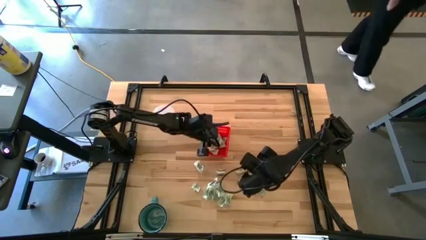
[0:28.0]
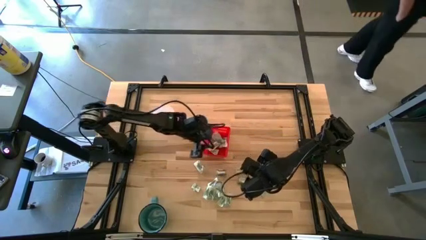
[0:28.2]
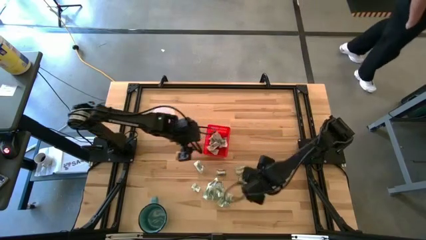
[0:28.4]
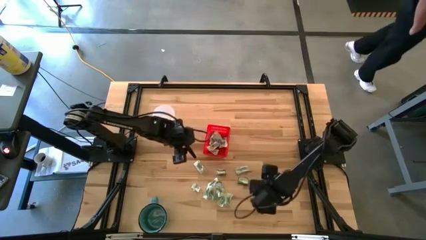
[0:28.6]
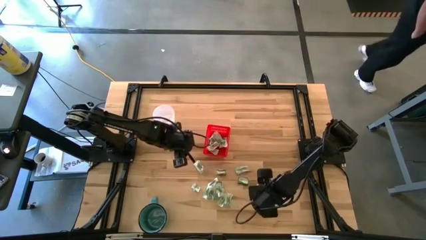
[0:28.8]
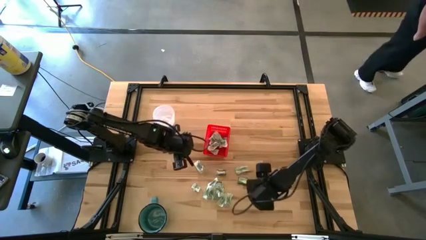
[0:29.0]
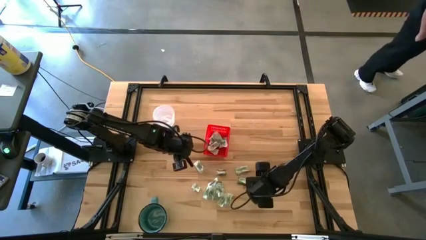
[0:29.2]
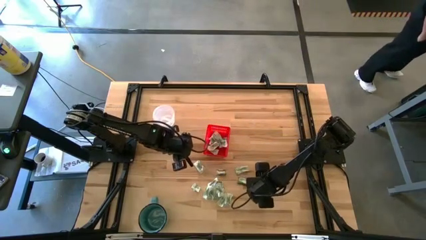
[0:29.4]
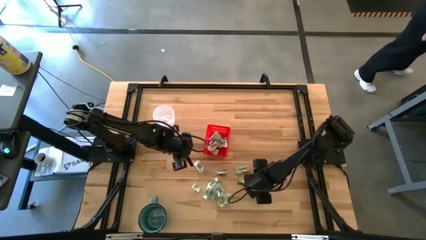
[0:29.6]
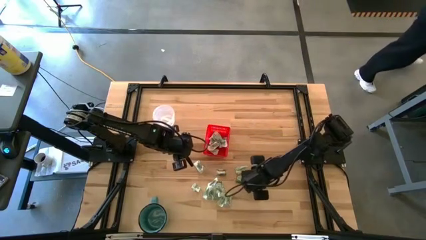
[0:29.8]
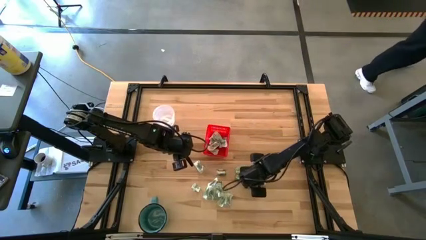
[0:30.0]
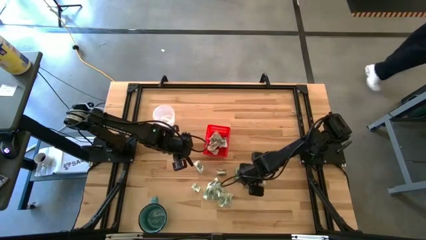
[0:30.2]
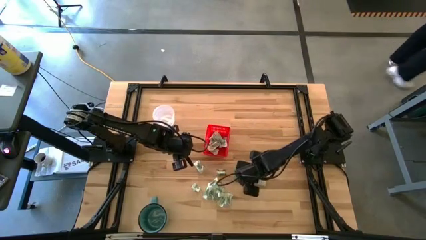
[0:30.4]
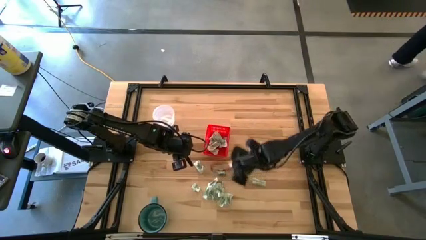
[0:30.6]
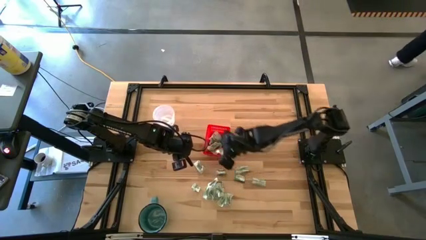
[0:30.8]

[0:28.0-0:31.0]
Task: Pick and place Stevia / Truvia into bins
Put the stevia packet into the red basket

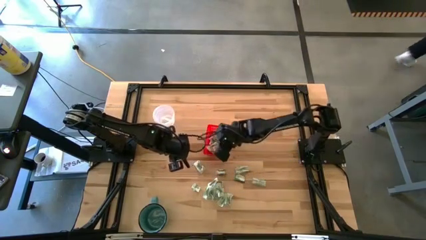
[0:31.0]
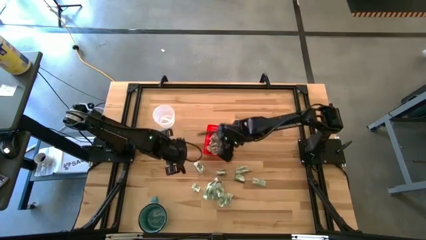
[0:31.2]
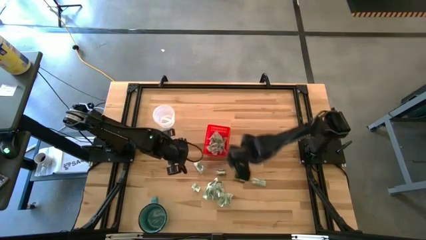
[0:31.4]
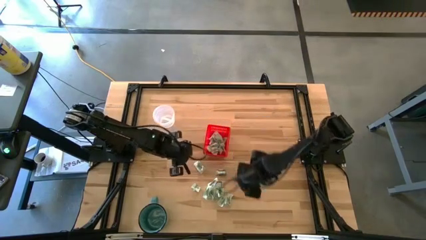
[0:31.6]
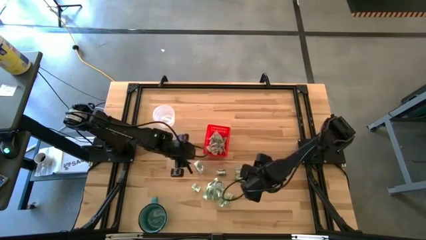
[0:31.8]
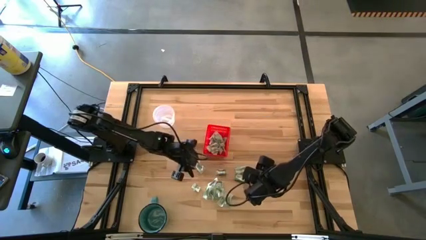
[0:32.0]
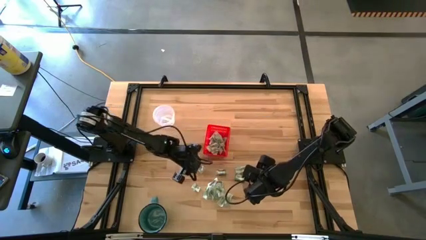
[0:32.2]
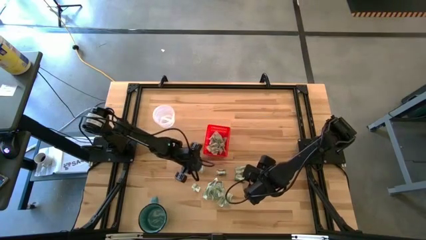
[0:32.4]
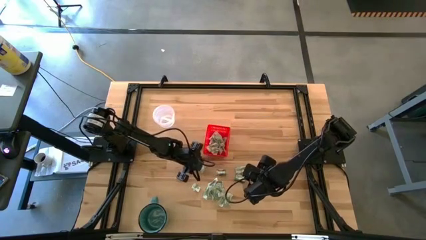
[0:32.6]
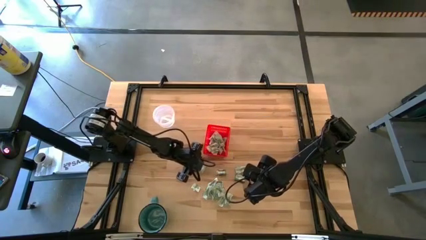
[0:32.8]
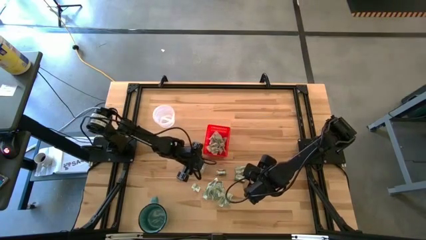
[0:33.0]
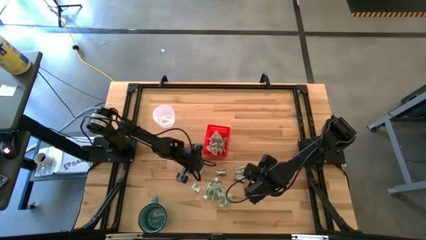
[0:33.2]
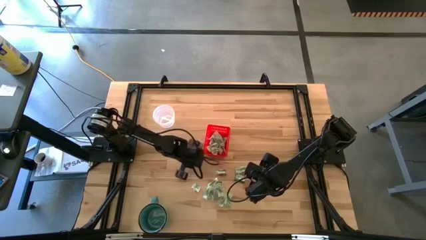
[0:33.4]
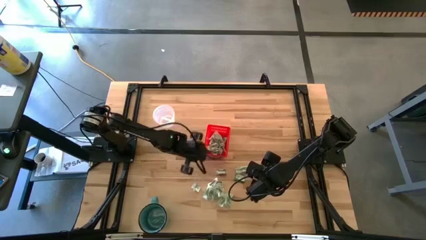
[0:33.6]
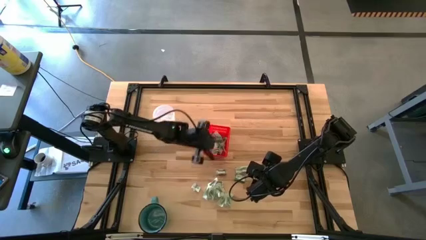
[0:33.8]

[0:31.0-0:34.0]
Put the stevia packet into the red basket

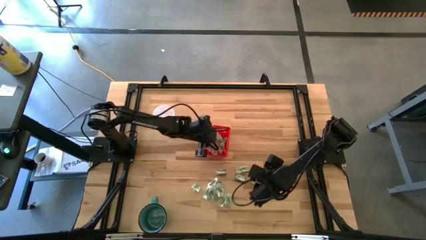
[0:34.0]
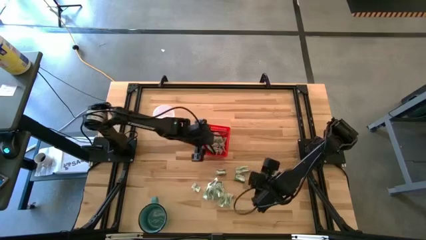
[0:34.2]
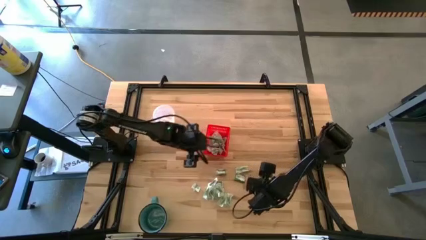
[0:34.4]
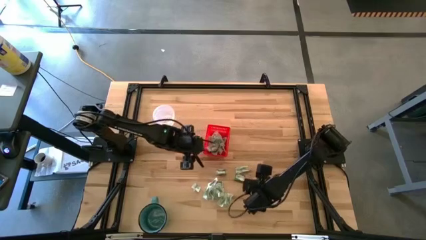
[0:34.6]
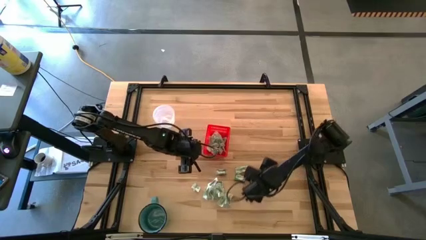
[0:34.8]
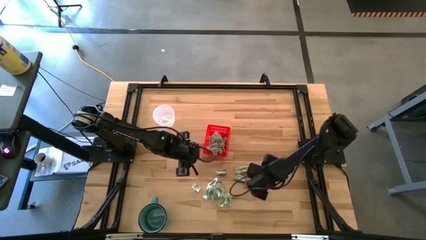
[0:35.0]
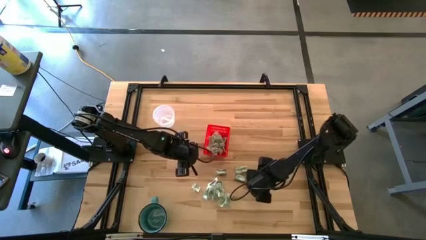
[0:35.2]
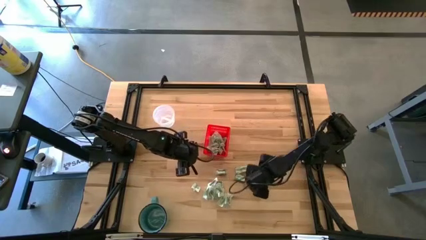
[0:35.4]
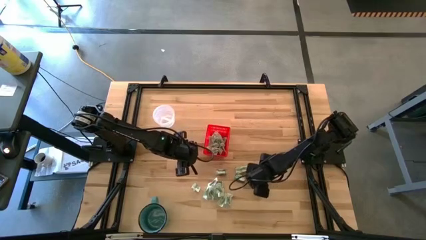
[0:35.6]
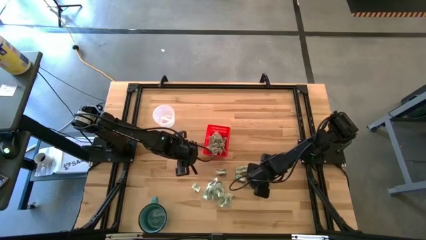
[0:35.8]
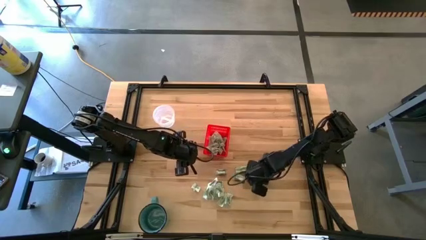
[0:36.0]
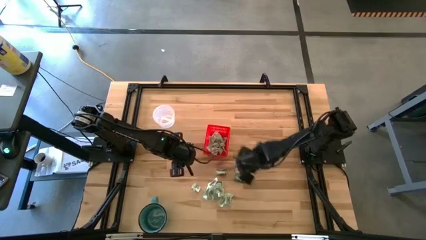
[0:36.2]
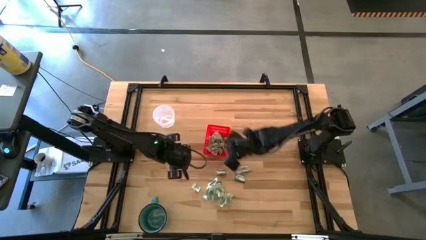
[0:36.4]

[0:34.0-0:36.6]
Put the stevia packet into the red basket

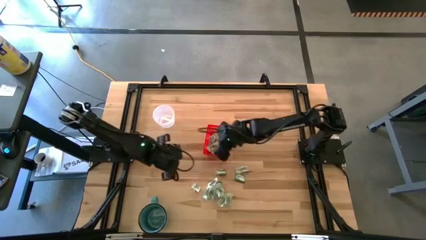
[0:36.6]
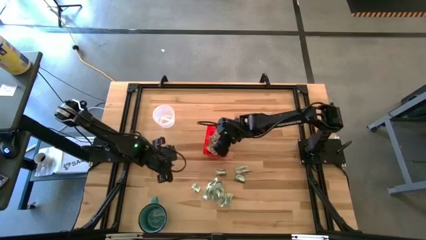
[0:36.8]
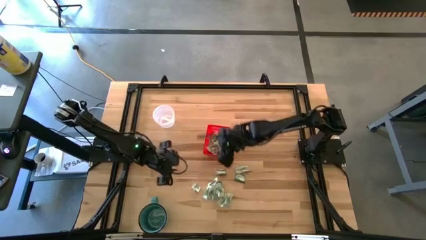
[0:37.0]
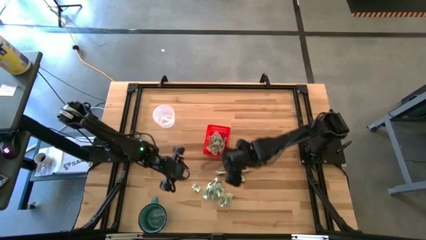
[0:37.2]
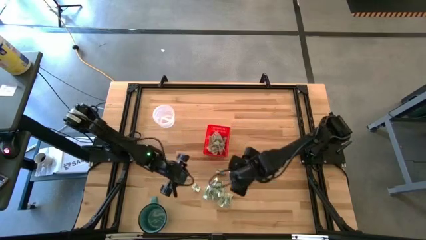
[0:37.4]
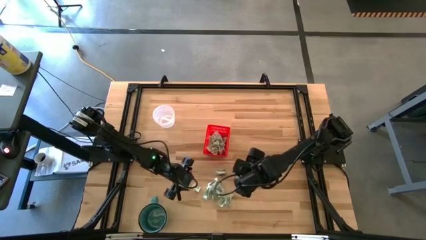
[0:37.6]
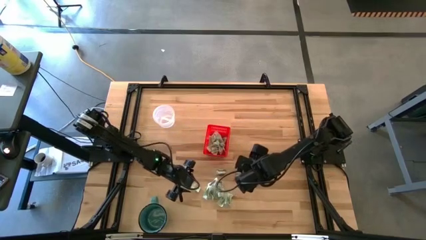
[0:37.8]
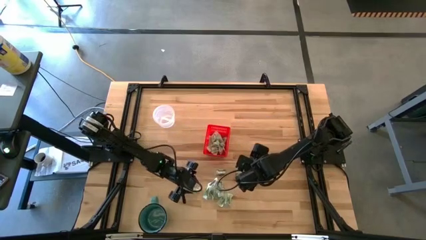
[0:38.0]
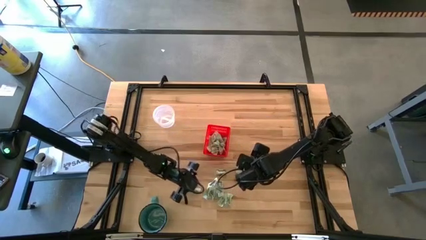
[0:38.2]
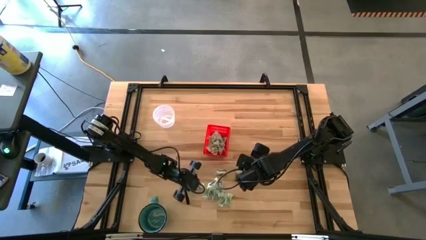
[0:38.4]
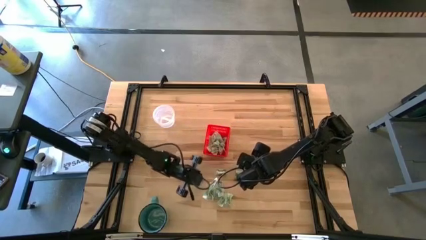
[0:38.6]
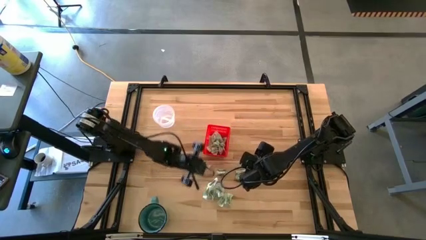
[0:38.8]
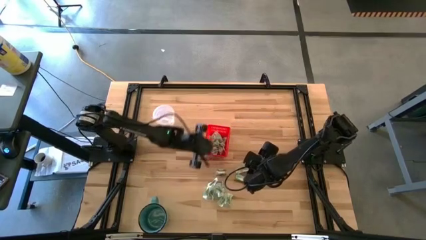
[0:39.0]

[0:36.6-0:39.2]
Put the stevia packet into the red basket

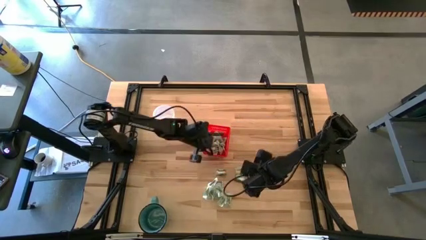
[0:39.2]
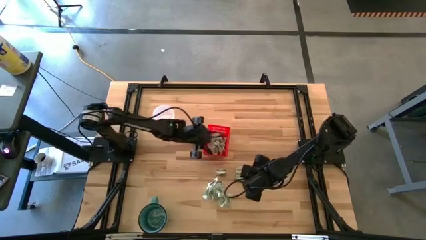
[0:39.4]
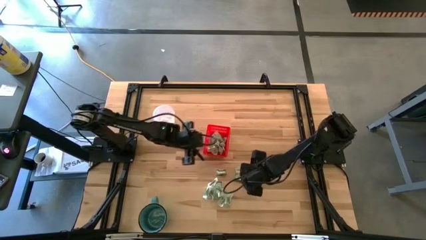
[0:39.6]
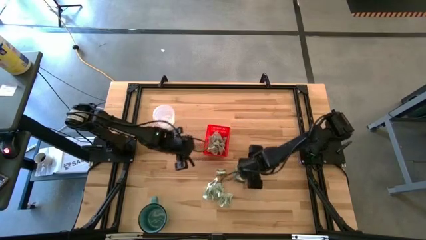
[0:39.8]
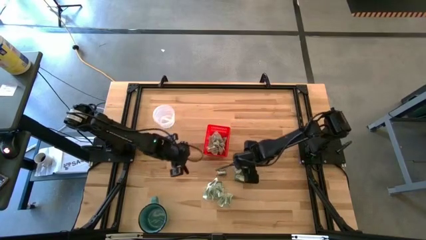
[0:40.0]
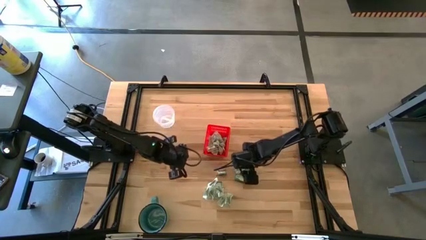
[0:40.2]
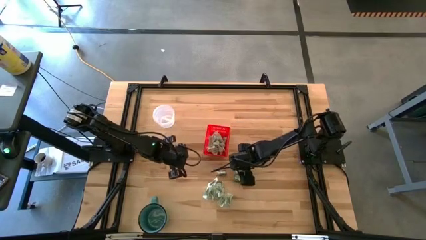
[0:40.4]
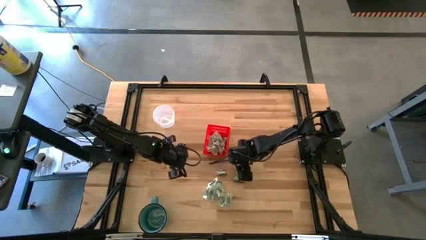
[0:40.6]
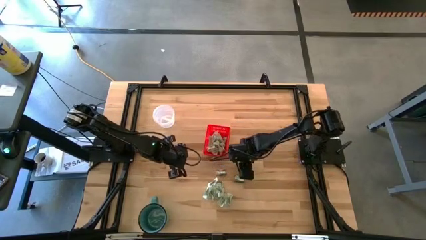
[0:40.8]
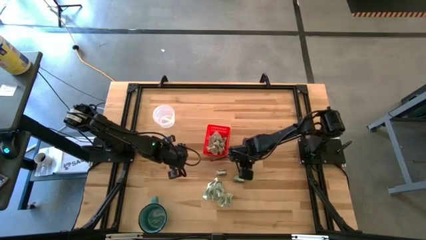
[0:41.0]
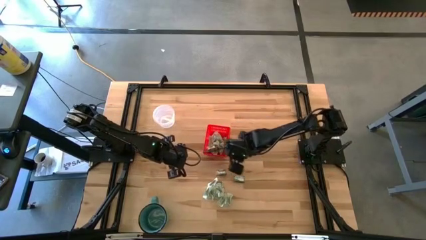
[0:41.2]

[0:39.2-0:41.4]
Put the stevia packet into the red basket

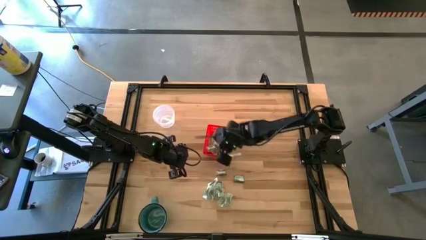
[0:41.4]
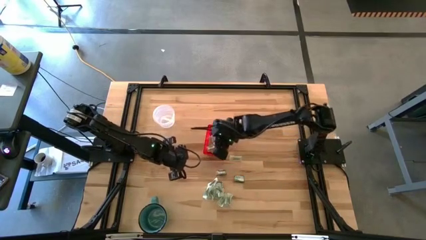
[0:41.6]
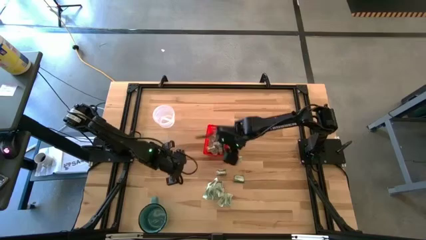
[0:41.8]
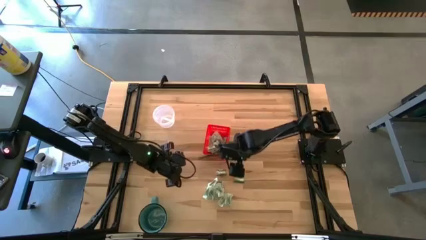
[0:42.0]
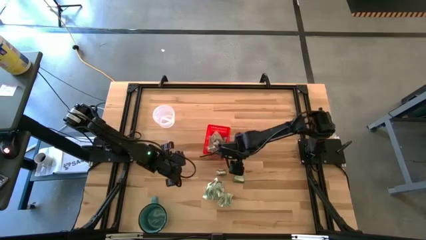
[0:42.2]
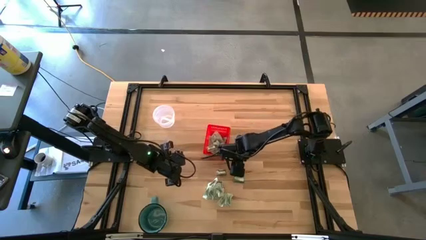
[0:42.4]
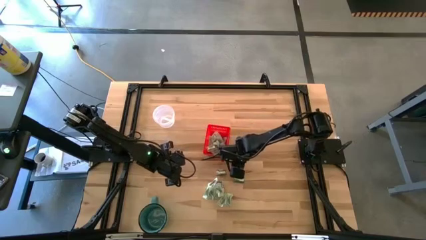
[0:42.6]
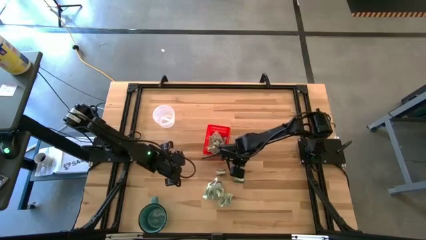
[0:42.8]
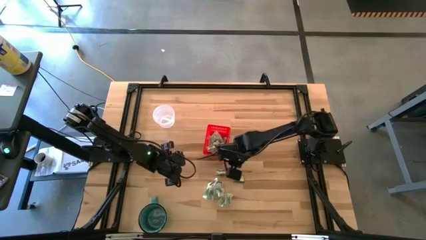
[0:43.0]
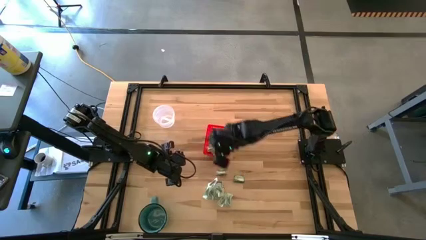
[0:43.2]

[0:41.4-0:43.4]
Put the stevia packet into the red basket

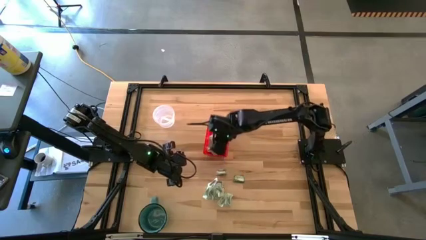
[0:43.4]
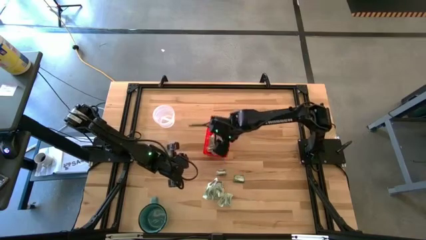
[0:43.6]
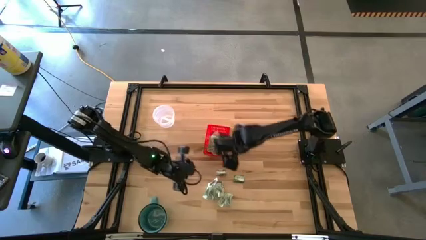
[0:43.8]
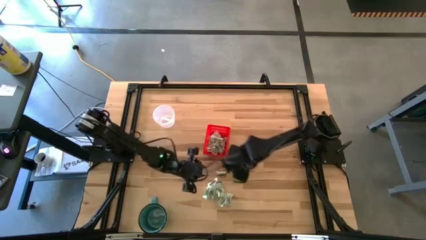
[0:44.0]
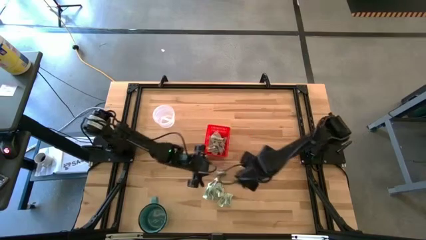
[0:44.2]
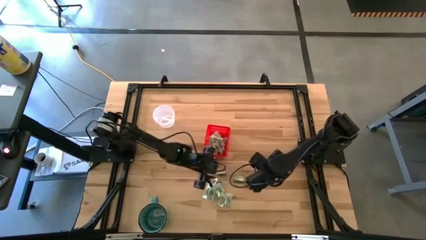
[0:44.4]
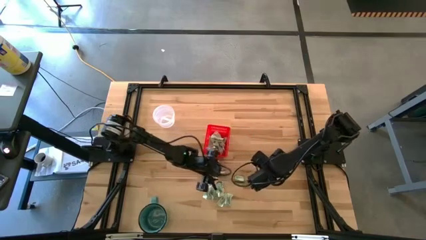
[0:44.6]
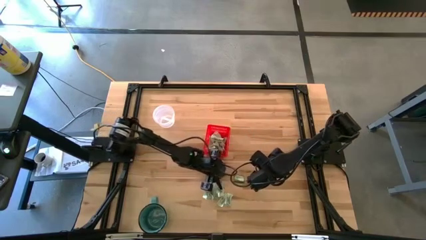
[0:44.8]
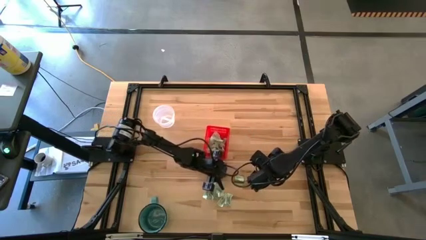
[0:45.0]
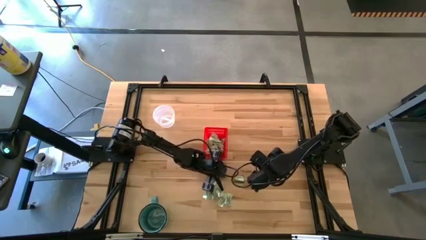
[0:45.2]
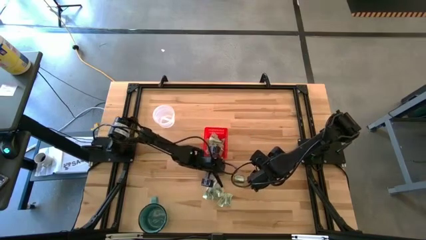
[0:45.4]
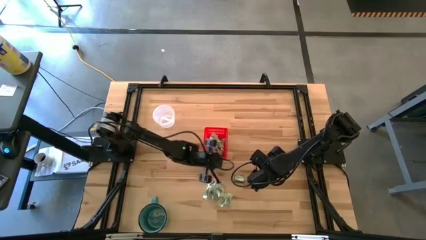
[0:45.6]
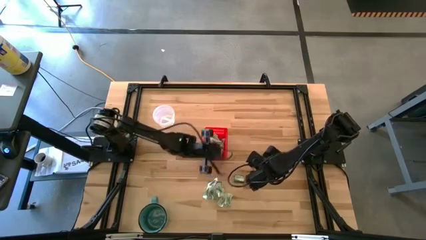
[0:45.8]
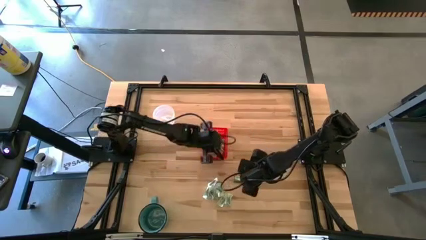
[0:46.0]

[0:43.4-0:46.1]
Put the truvia packet into the red basket
